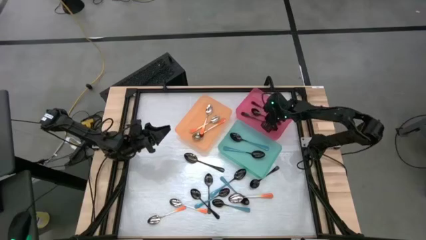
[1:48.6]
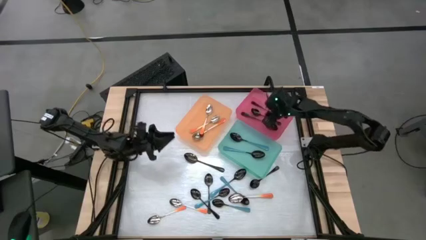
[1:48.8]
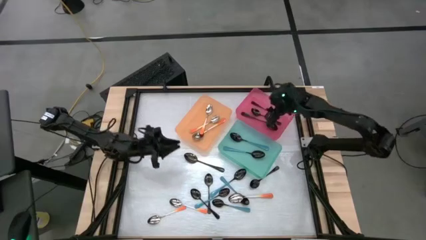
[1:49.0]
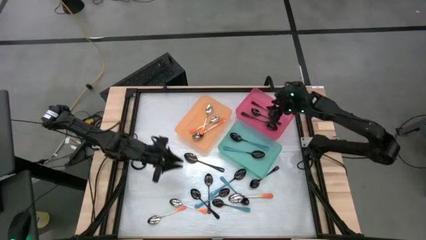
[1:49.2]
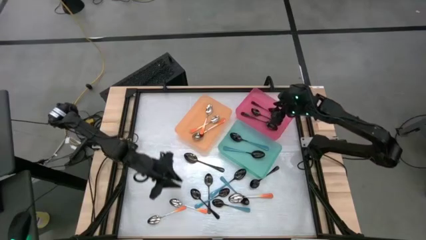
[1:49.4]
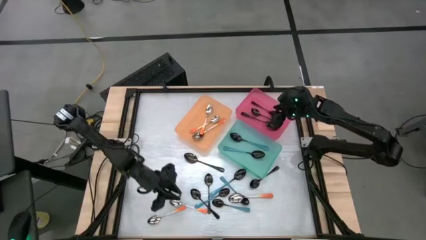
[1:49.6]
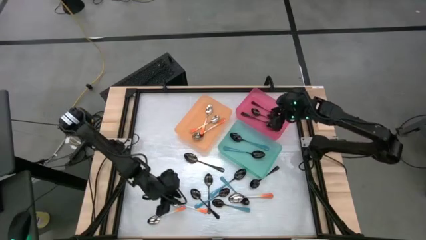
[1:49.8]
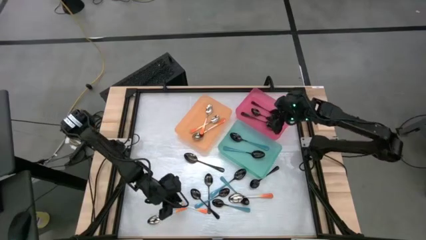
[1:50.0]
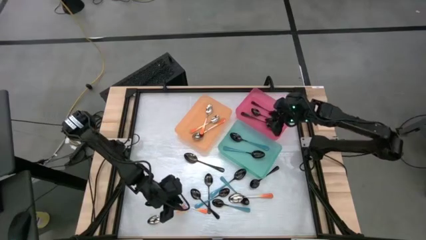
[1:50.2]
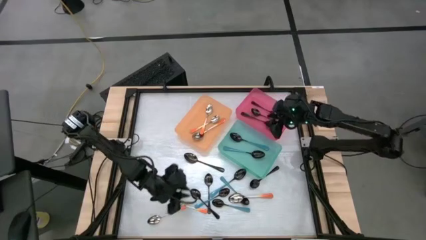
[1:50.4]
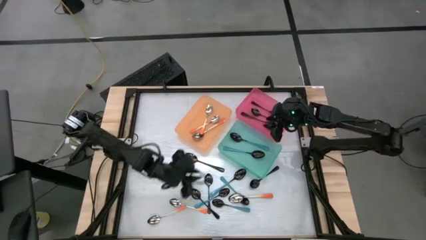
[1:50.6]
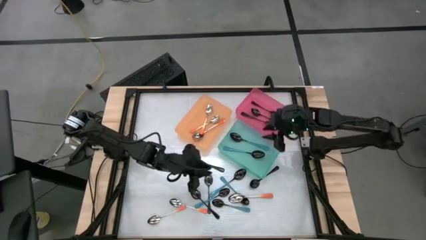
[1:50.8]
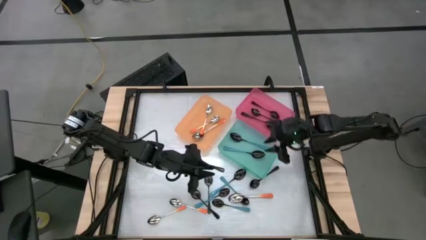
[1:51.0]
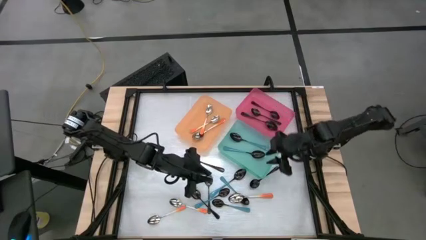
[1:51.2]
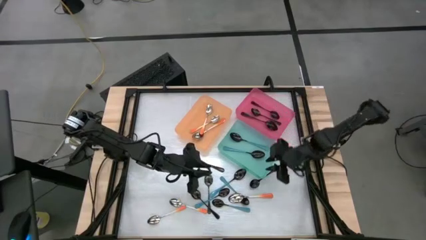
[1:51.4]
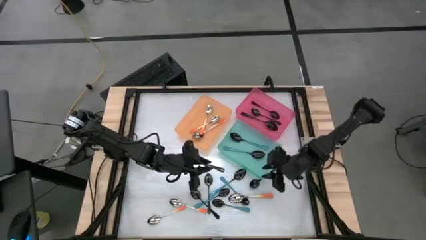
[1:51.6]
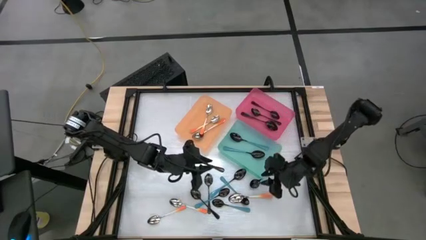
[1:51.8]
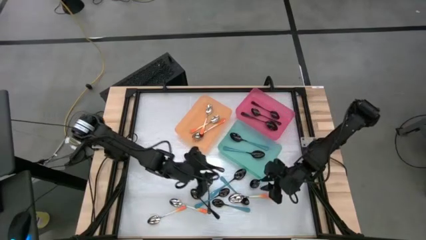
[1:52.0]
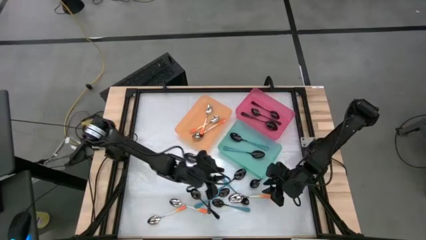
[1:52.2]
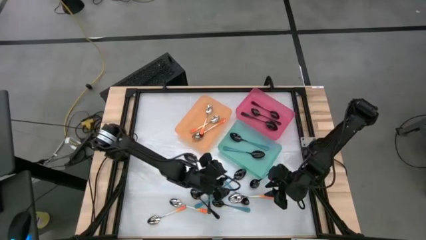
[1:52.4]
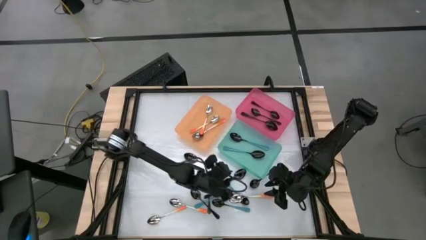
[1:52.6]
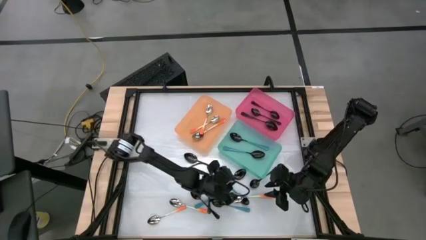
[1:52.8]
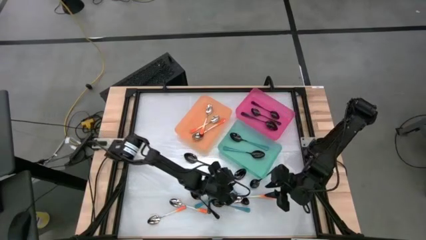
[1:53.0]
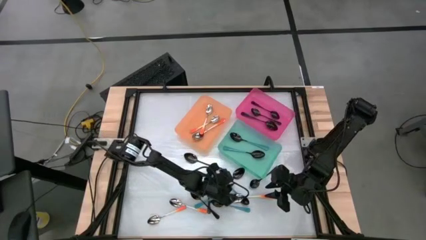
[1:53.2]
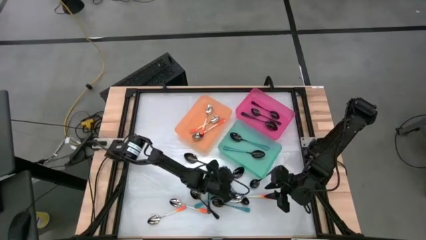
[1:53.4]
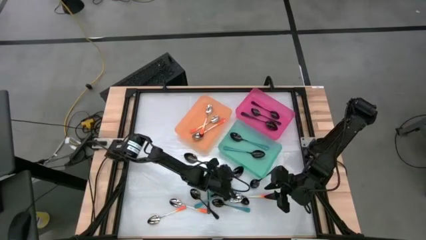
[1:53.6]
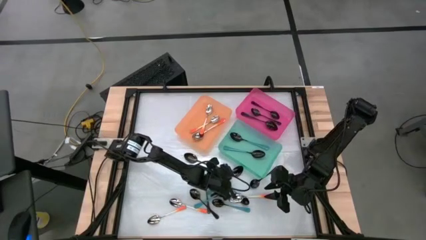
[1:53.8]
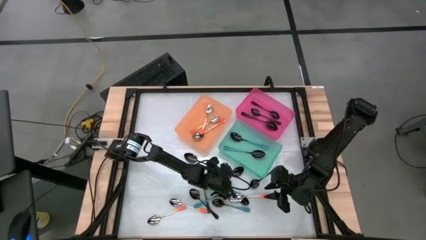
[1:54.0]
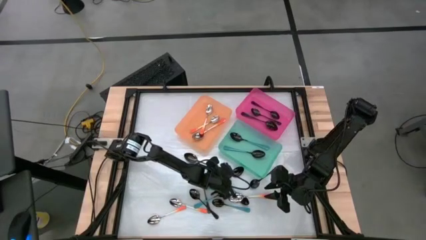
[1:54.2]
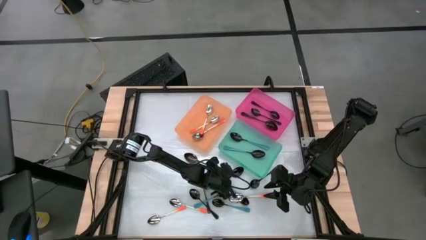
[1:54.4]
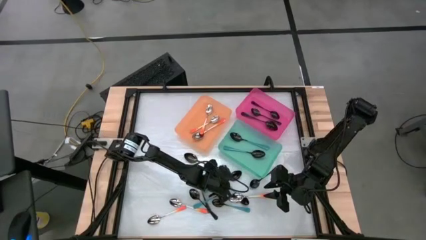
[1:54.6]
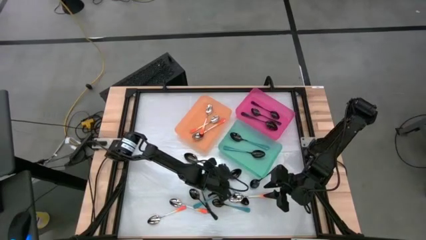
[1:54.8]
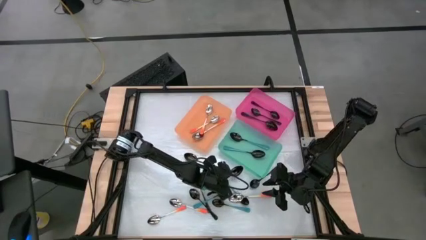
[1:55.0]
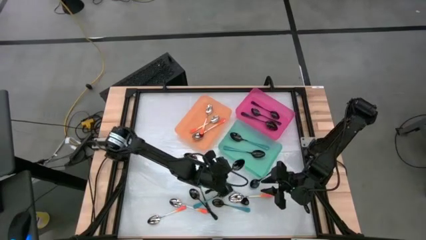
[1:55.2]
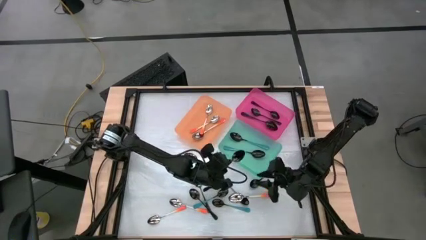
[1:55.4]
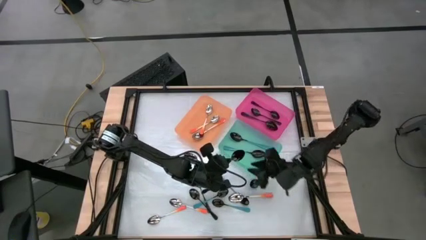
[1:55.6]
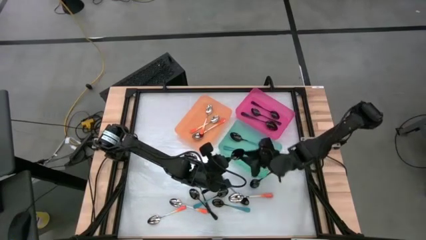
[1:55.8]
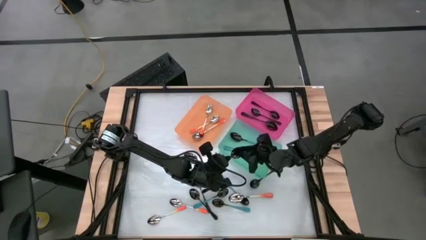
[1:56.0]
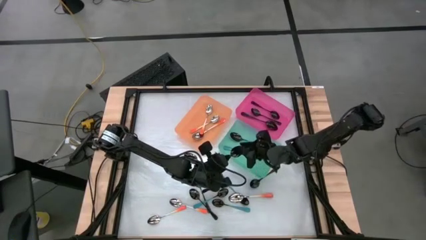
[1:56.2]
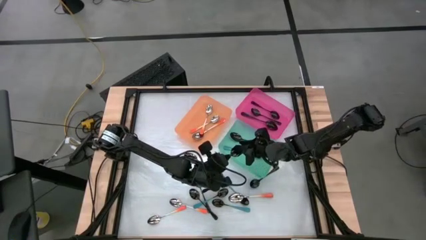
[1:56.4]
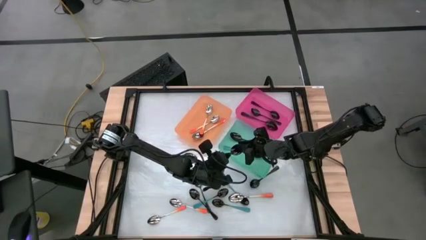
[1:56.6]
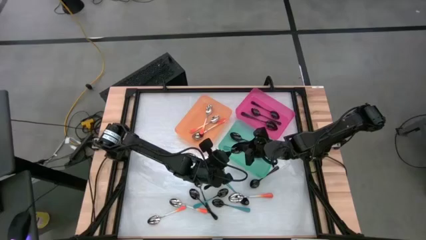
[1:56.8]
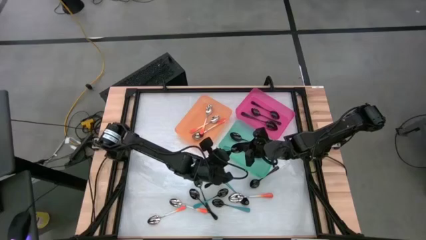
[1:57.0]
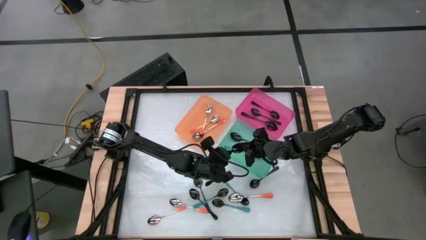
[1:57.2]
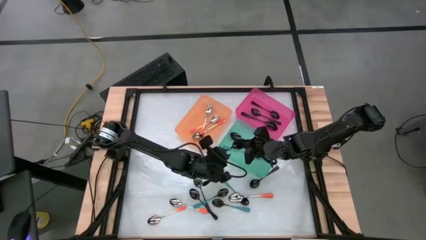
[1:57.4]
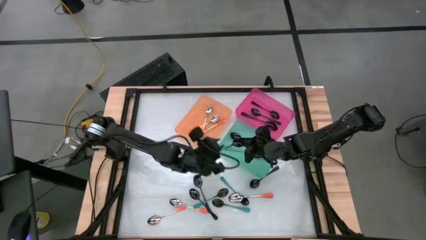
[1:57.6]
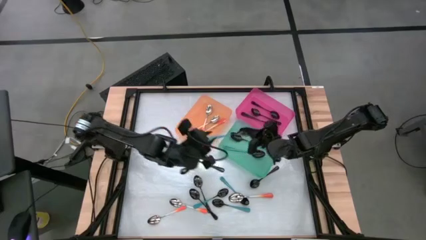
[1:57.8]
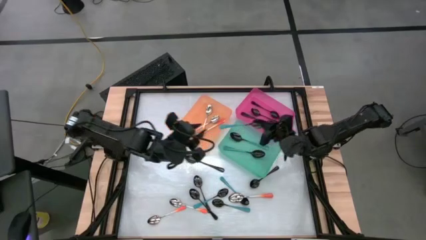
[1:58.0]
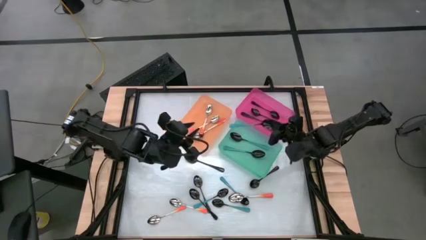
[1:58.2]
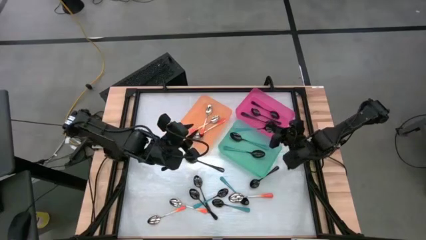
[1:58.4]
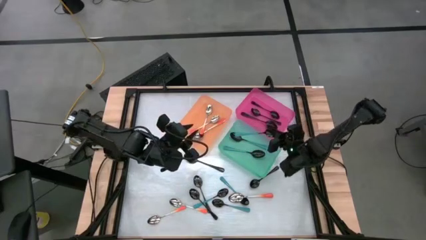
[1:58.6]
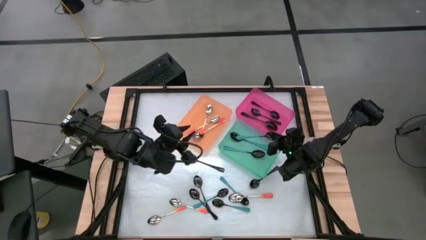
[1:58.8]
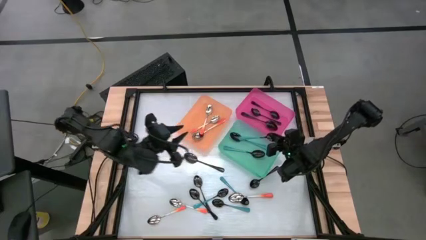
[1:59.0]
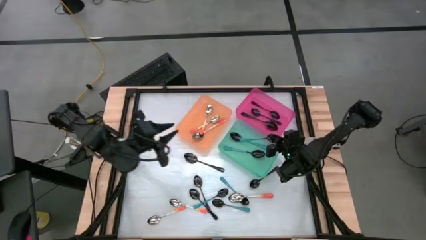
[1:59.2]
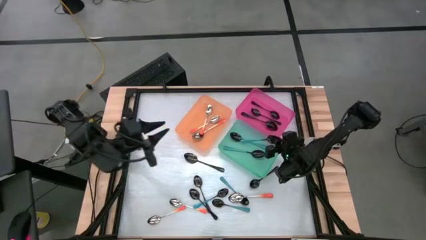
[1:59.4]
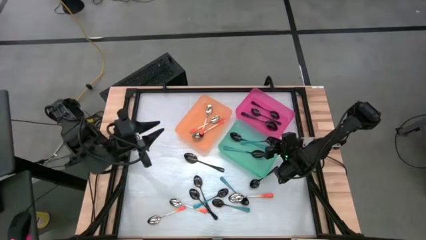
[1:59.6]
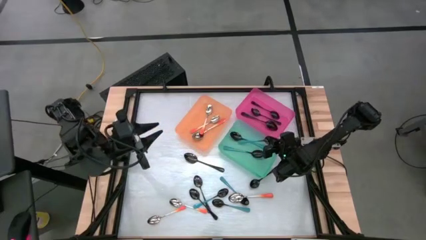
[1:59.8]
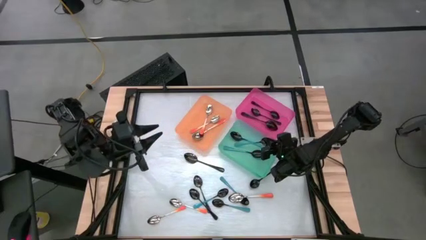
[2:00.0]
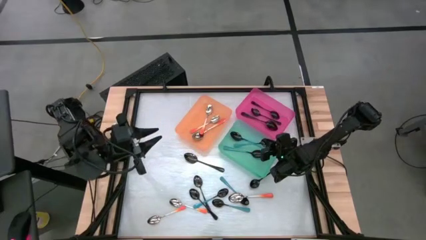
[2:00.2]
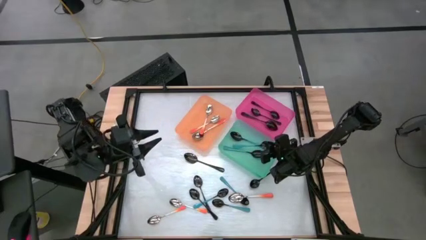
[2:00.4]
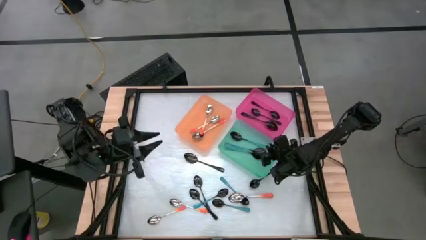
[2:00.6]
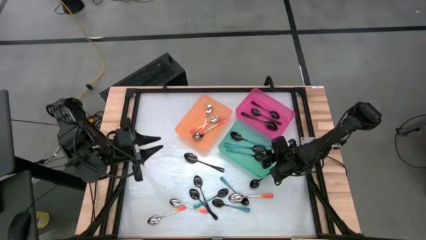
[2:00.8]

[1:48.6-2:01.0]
Task: Sort silverware by color (type)
Put the blue spoon into the blue bin

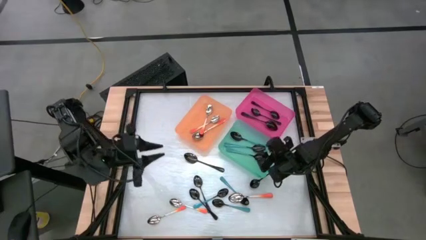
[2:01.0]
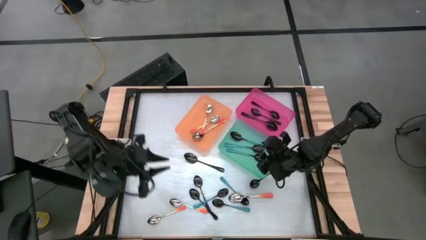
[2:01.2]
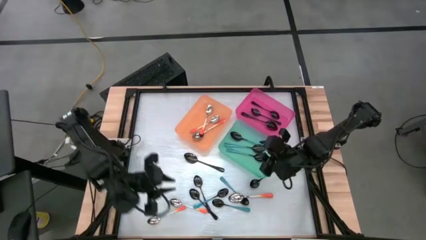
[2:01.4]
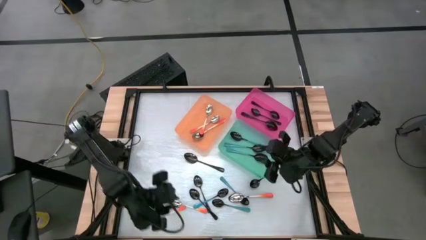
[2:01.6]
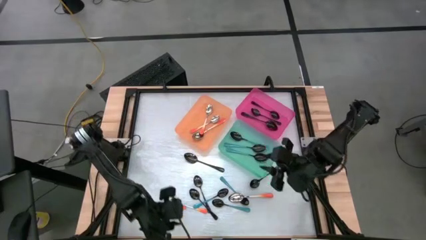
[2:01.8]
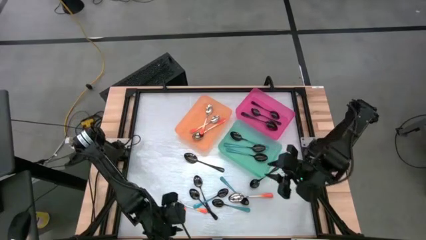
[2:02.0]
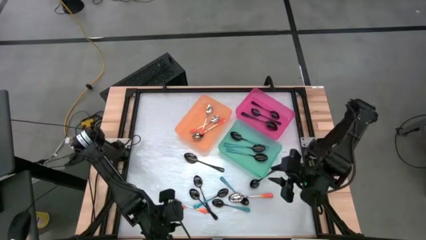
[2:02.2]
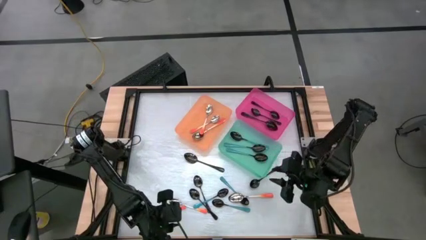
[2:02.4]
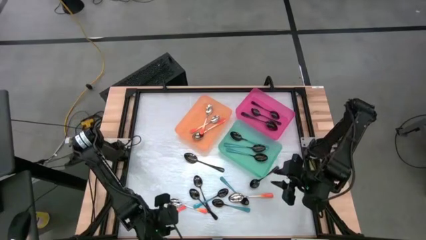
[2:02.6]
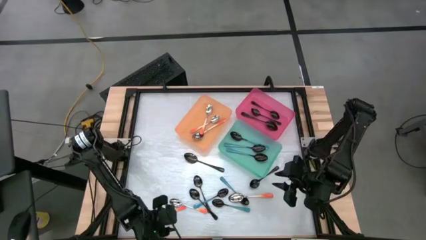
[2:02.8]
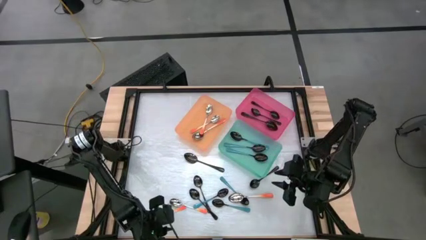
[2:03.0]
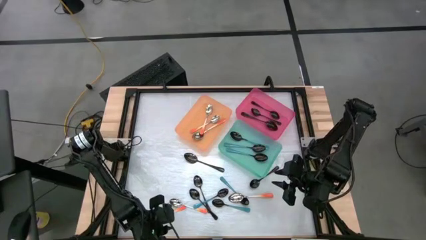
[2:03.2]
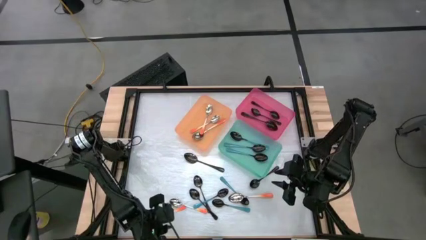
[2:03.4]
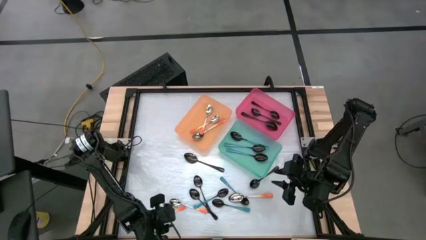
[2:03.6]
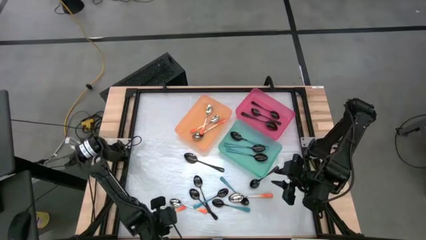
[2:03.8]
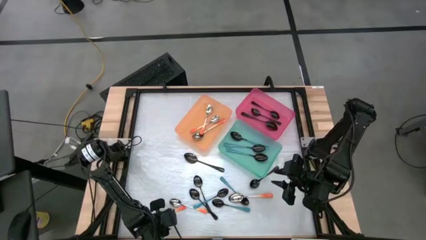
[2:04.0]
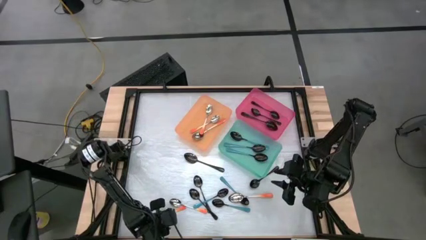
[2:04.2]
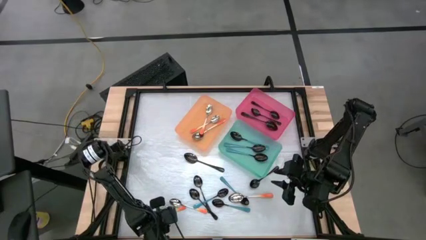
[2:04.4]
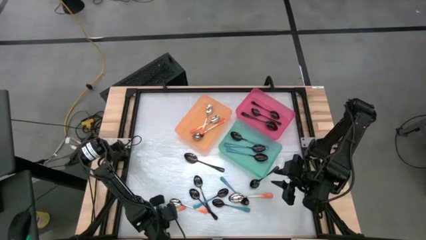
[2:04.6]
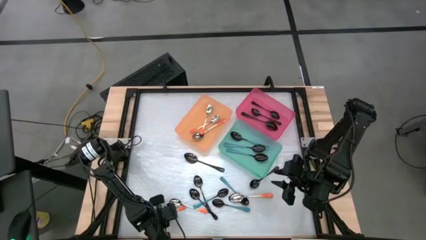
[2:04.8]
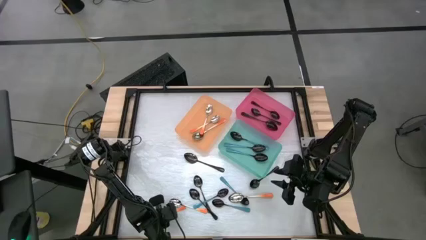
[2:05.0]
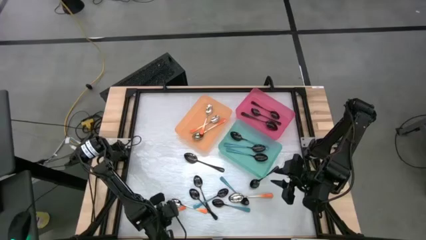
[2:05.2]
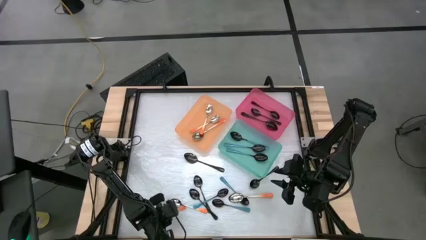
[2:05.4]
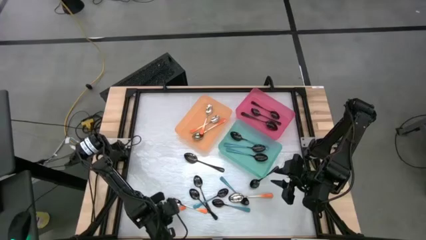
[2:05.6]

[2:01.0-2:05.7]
Put the orange spoon into the orange bin
